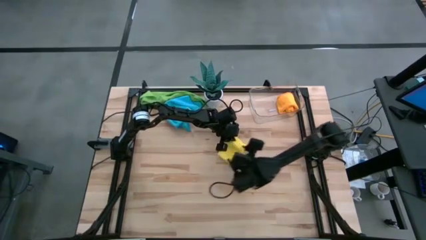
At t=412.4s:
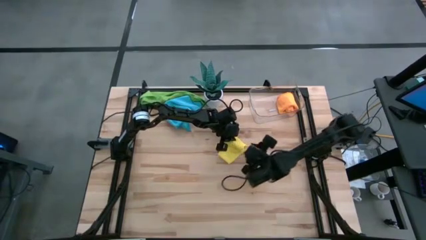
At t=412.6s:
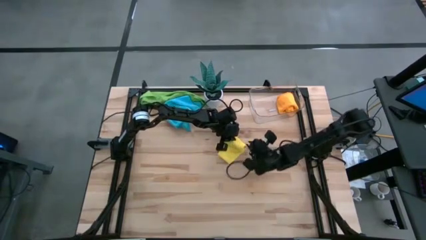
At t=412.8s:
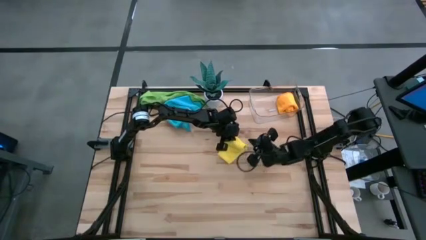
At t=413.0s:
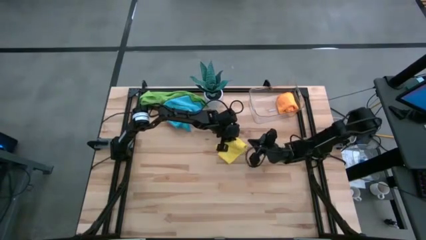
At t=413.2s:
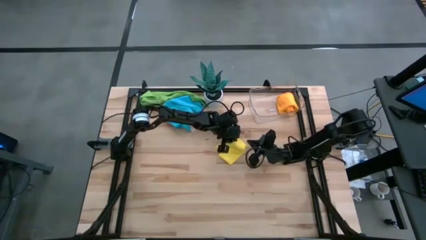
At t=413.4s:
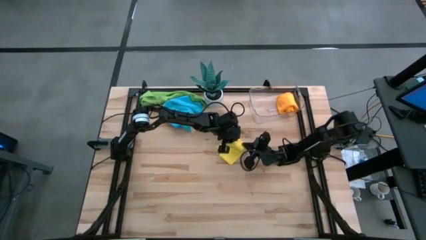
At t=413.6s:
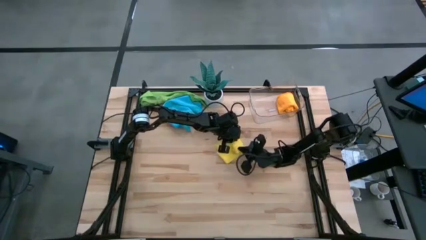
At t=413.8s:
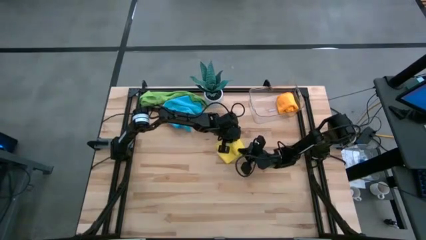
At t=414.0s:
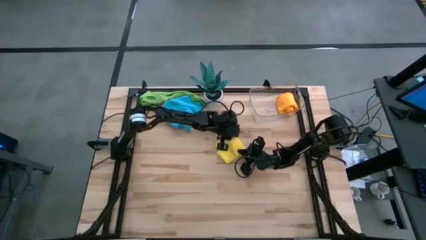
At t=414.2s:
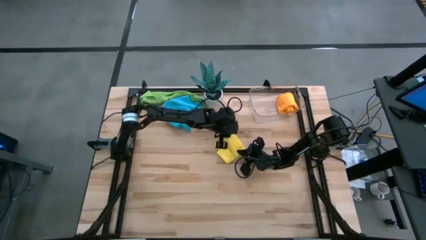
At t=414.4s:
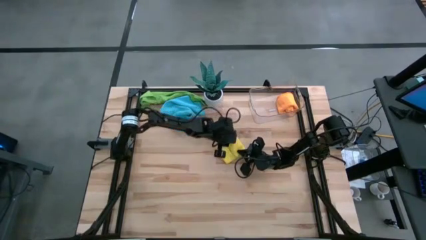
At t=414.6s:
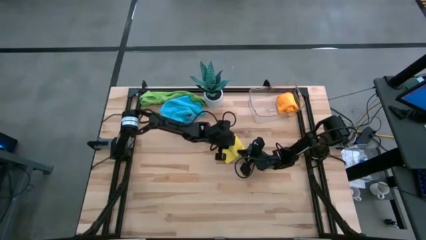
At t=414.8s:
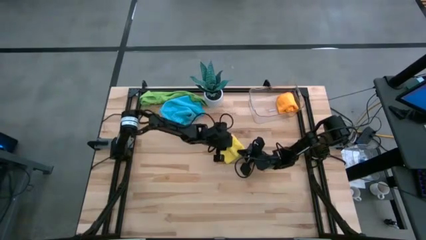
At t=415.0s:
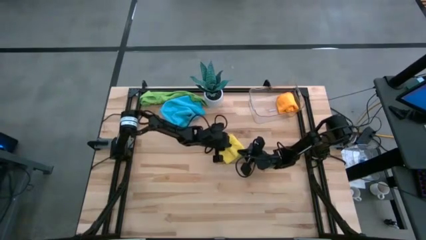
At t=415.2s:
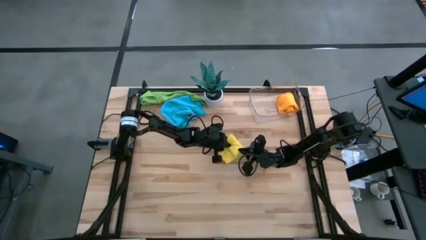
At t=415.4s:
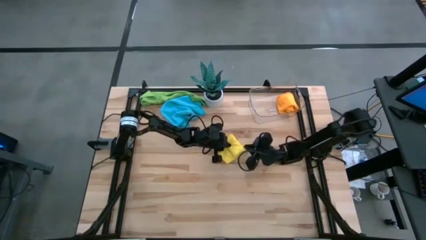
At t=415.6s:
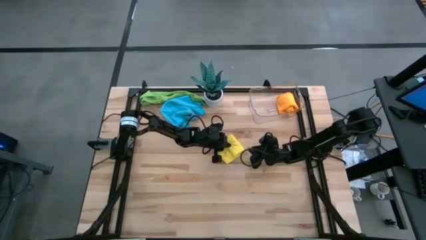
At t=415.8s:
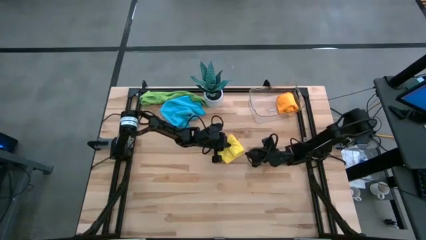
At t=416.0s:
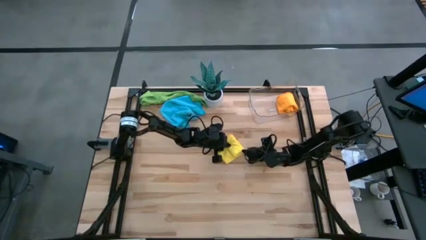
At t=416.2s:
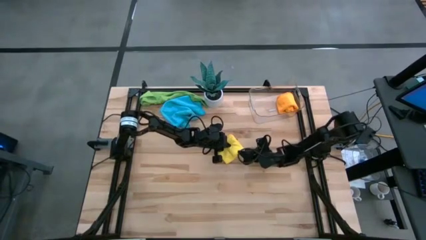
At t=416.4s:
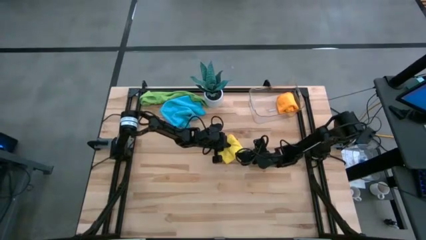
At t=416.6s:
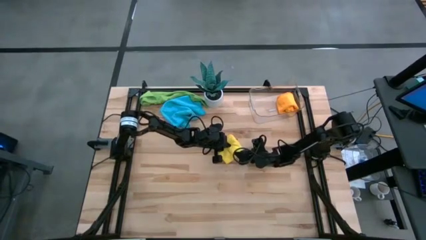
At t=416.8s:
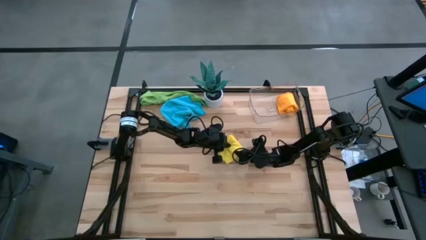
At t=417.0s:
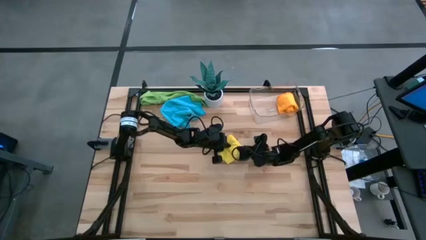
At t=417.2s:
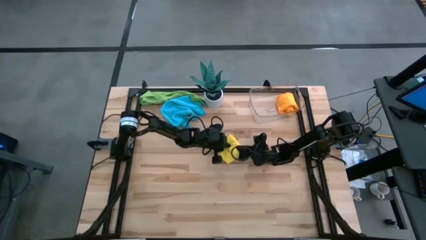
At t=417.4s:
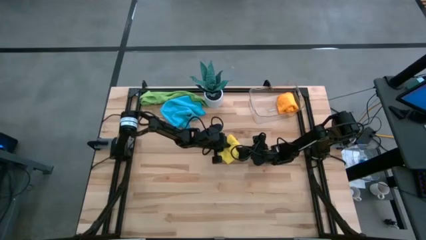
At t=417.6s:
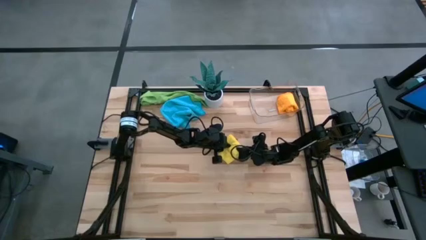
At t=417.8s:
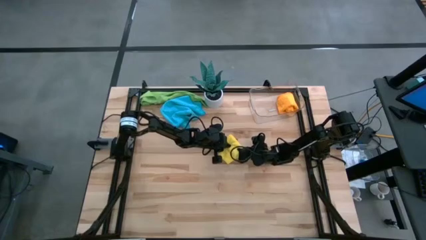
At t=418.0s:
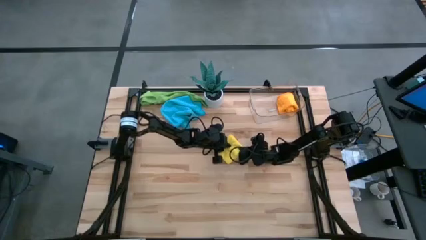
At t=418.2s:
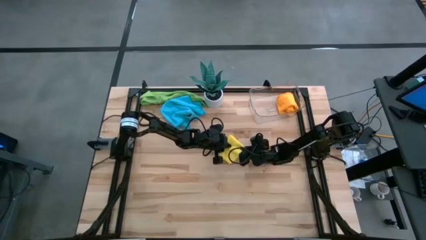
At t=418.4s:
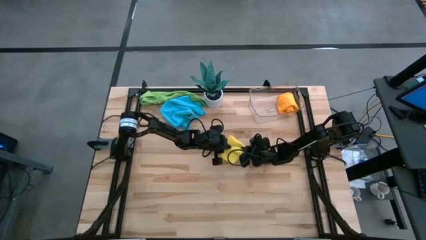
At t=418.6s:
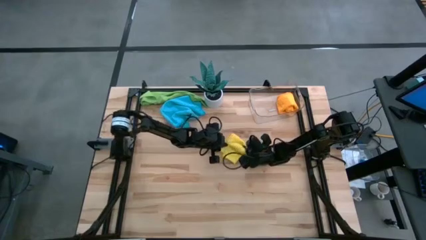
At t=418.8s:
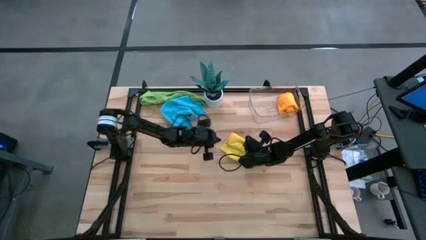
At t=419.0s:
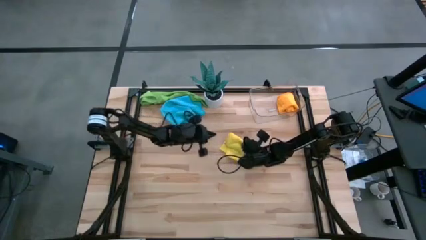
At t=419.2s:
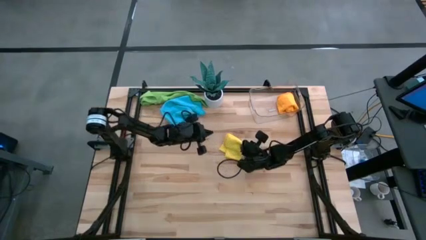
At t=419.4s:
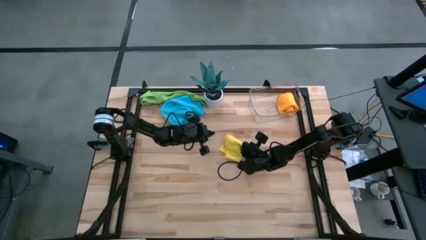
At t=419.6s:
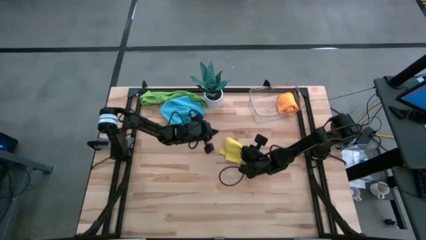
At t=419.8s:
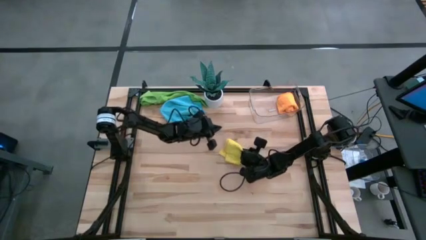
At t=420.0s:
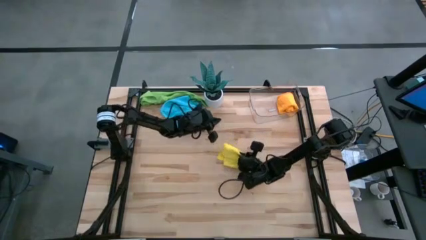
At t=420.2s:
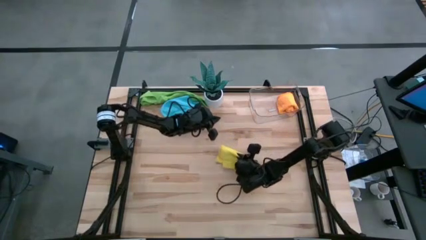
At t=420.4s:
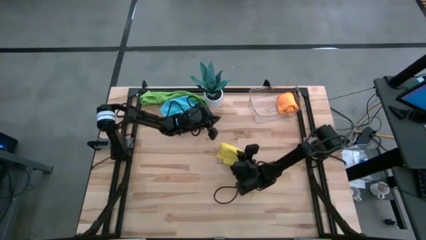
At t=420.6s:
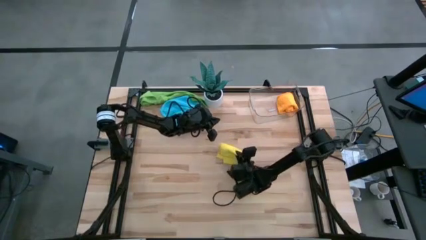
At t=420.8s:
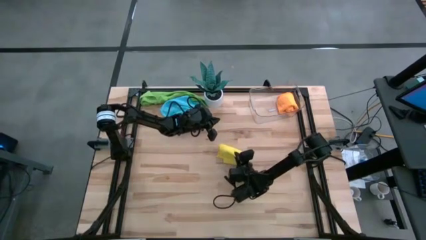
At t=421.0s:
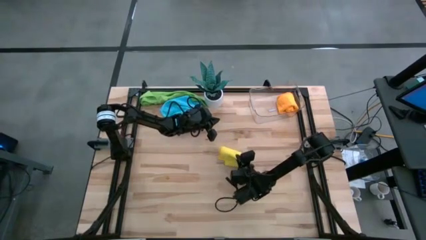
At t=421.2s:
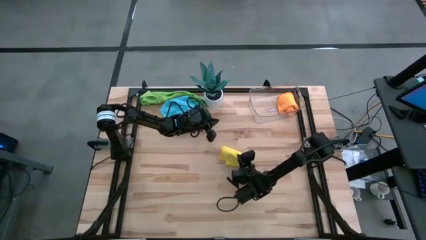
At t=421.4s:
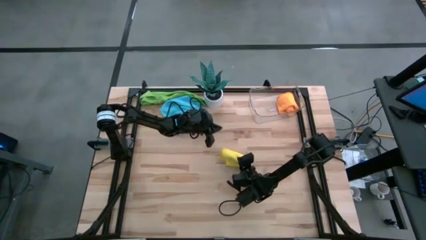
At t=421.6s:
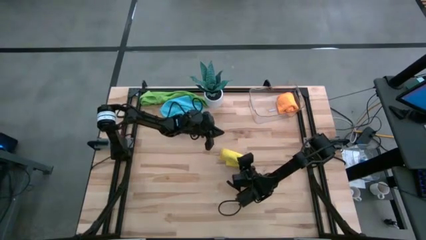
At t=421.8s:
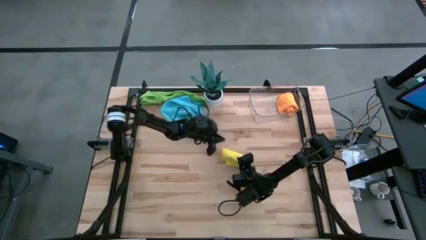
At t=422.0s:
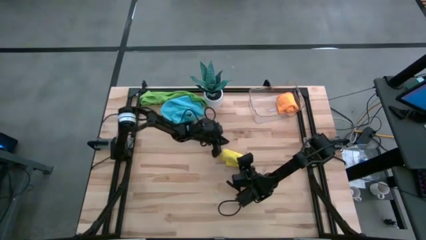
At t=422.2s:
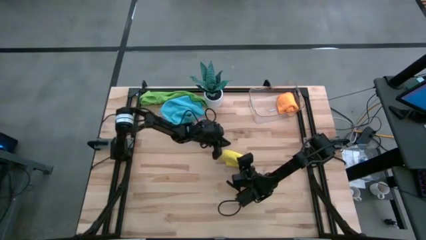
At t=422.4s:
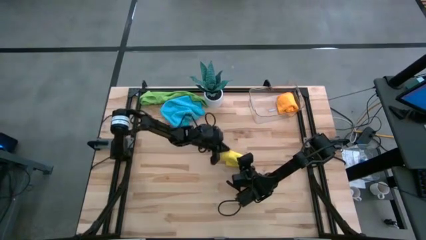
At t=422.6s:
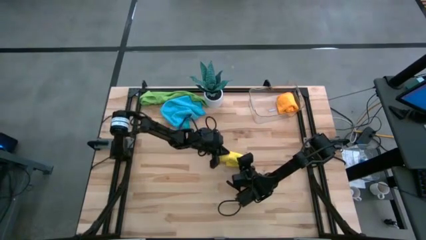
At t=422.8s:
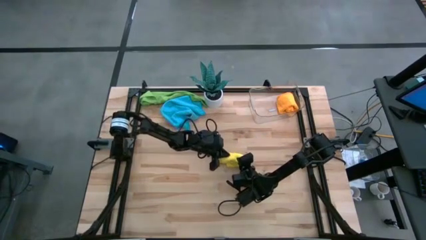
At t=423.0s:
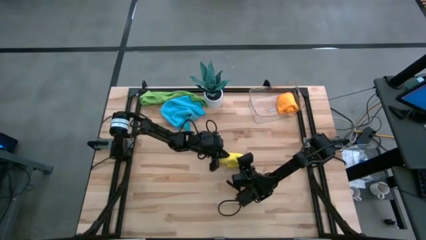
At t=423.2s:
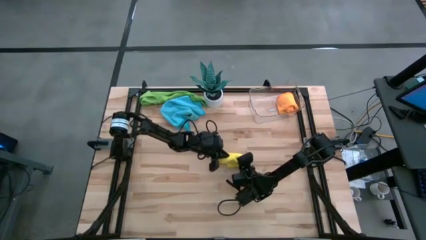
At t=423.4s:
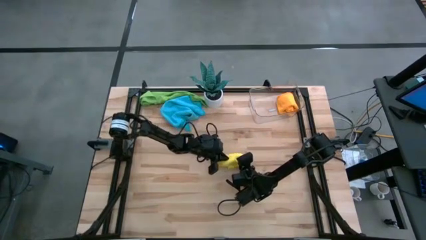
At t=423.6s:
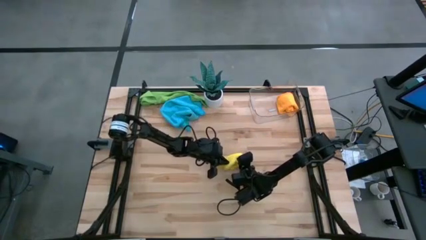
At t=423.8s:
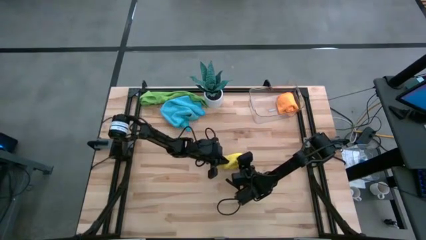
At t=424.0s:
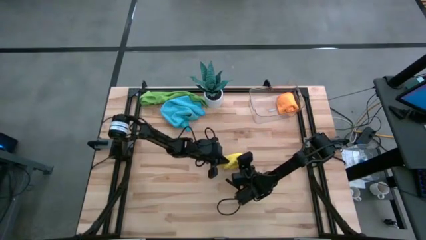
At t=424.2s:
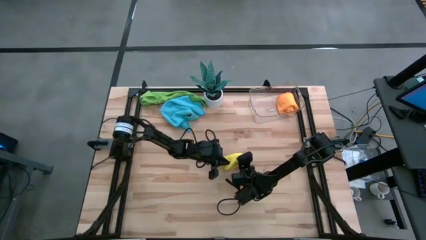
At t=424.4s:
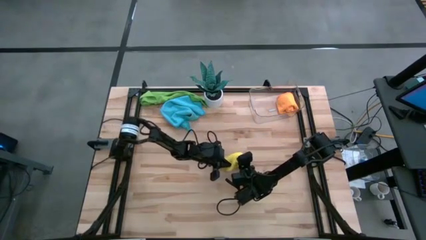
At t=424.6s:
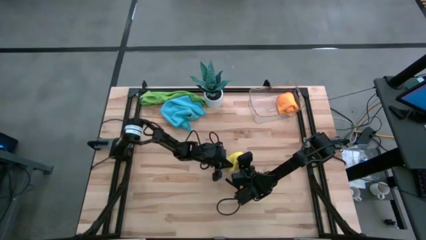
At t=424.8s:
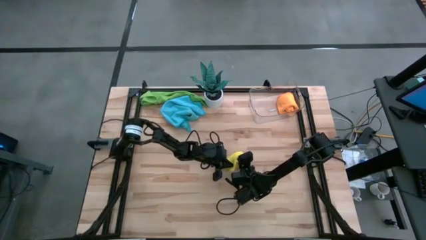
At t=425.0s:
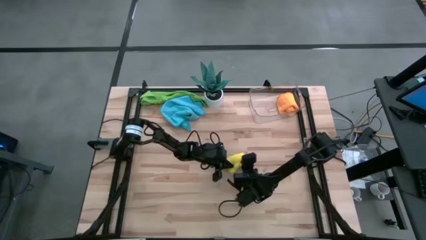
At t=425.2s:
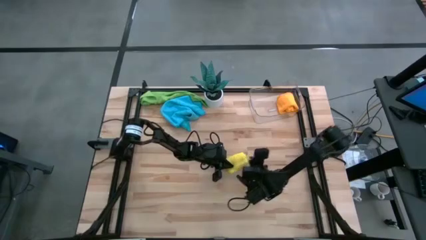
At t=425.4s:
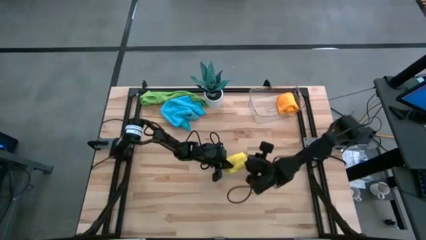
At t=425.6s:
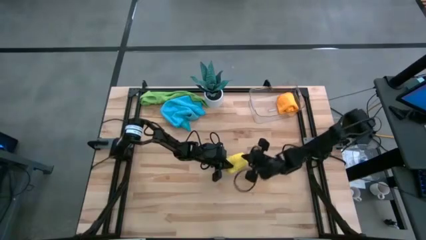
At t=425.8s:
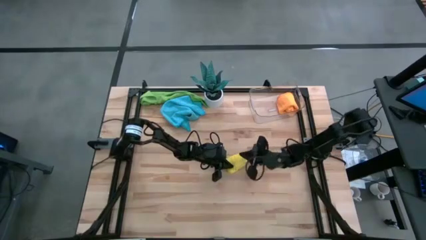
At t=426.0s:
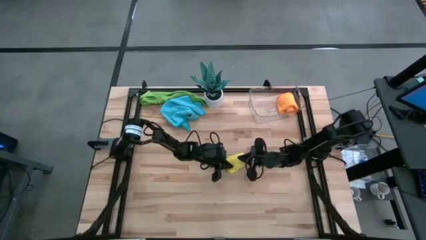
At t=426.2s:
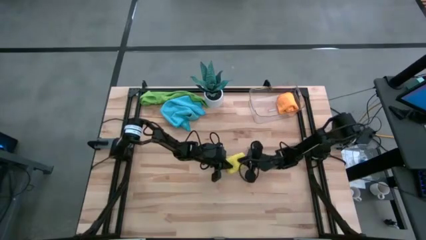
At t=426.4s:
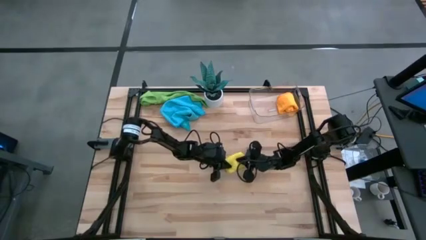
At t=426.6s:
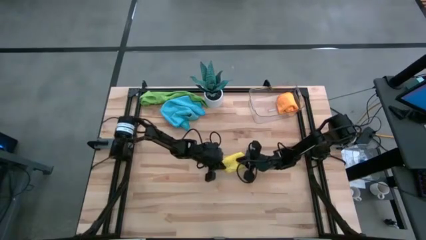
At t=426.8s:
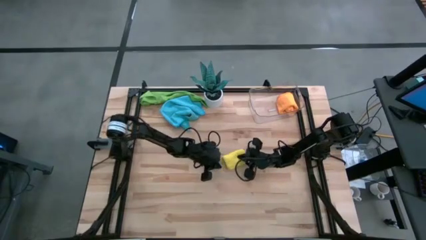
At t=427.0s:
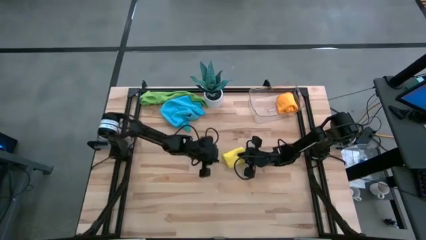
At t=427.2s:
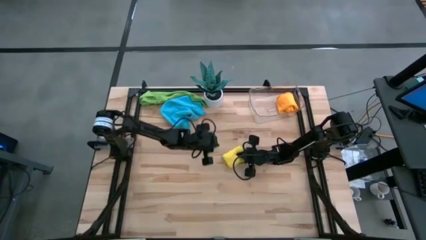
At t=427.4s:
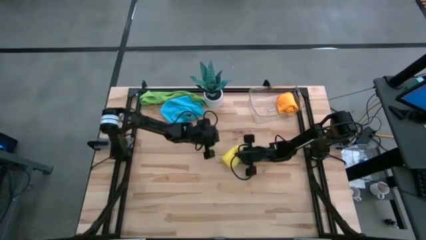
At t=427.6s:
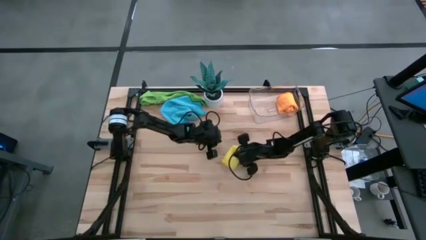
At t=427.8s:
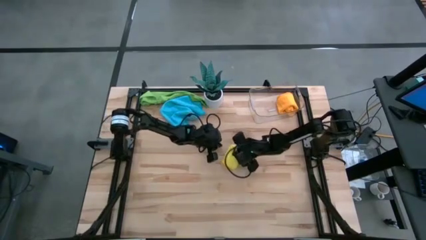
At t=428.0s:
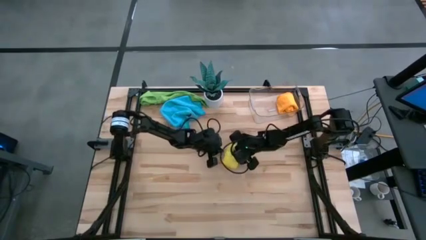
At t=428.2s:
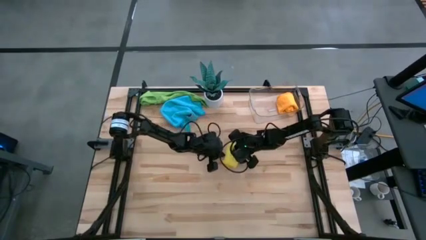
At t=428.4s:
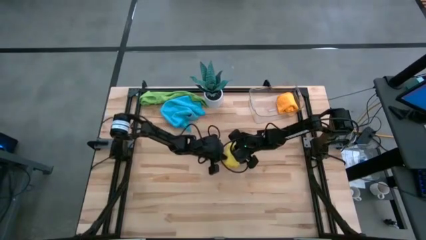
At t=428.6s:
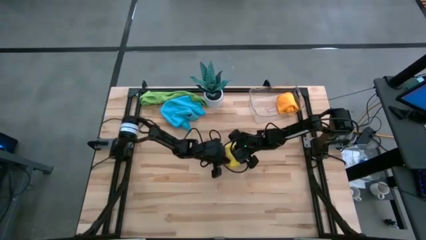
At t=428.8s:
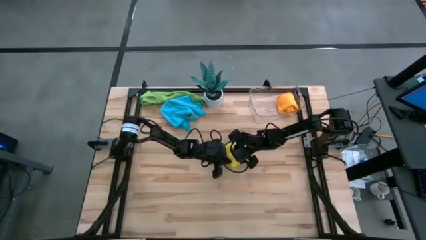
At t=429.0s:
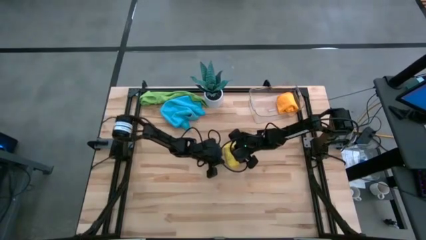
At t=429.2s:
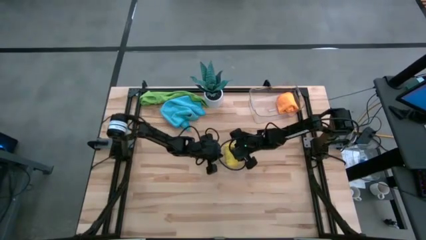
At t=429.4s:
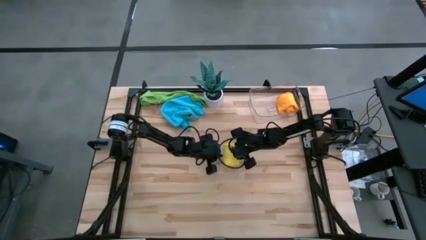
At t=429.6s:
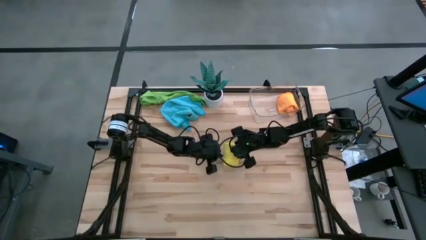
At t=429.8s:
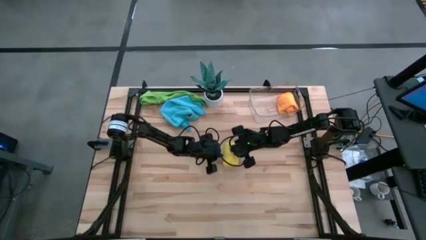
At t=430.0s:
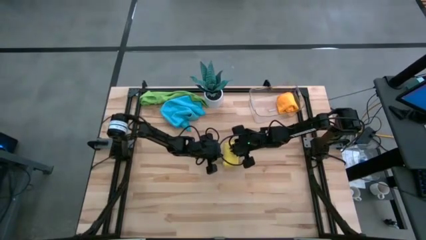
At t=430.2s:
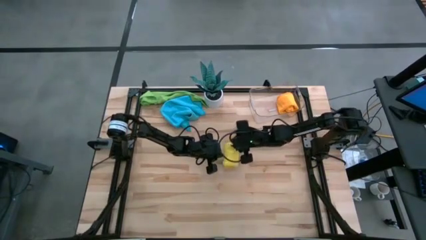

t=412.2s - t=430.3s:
Task: Roll microfiber towels into tight, uniform cylinder then place into a basket
Roll the yellow microfiber cloth
